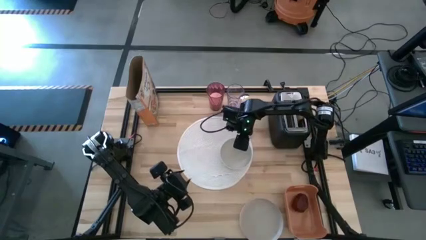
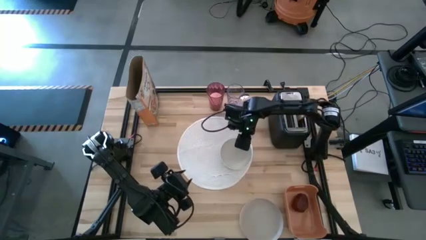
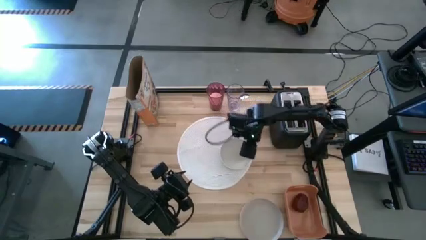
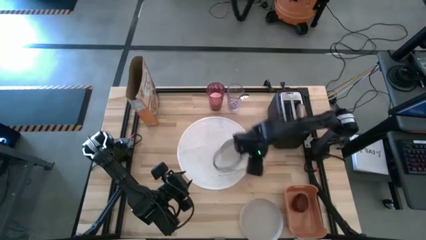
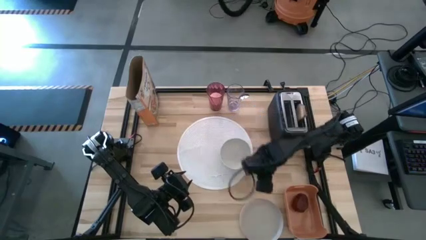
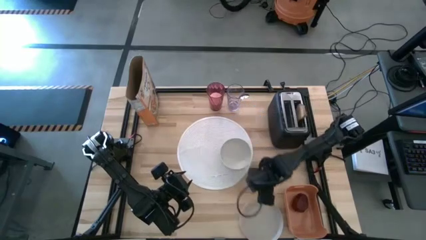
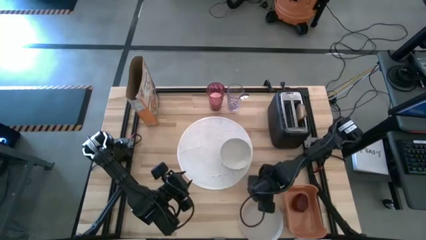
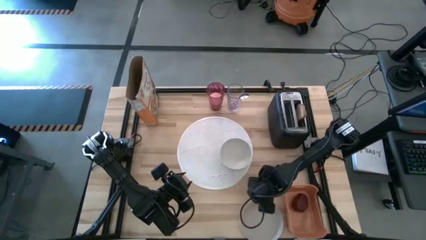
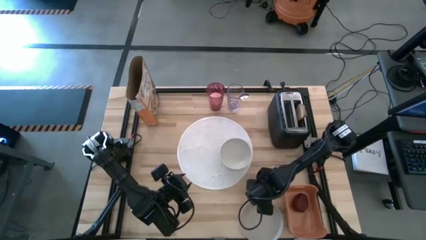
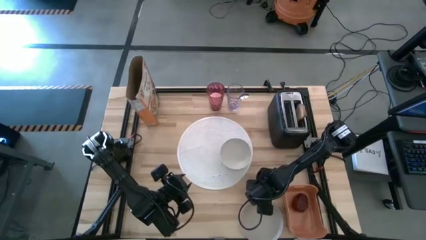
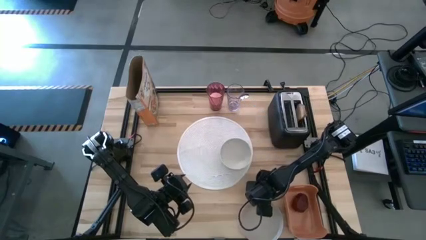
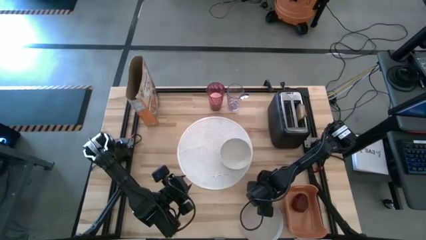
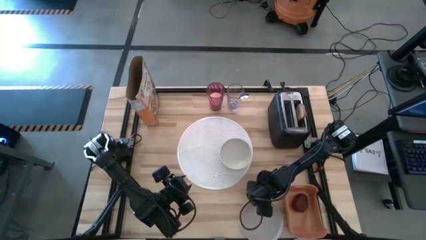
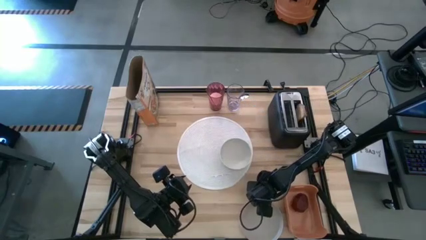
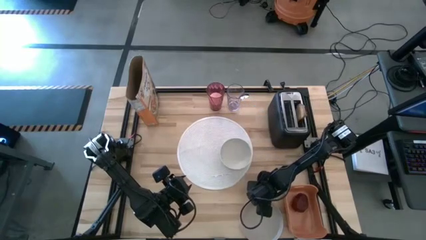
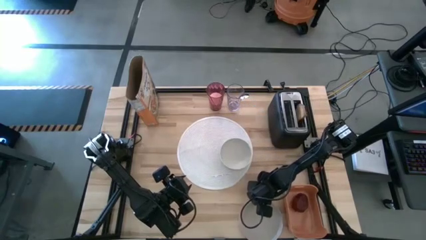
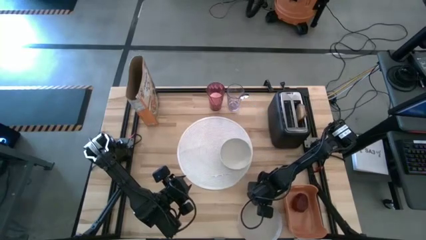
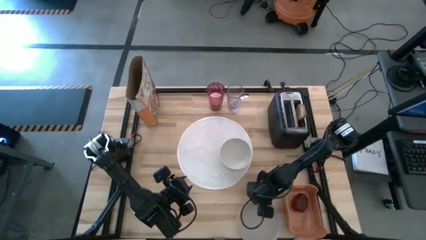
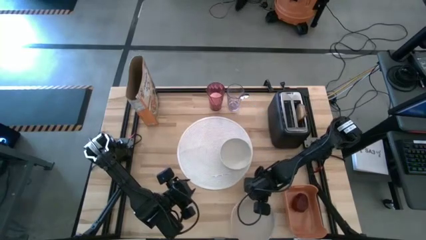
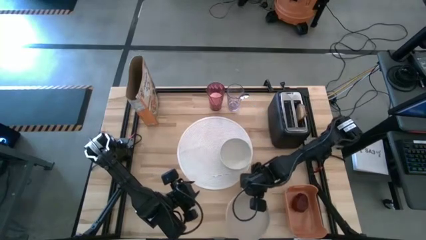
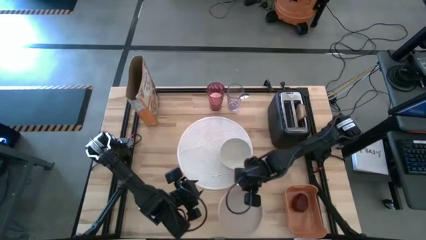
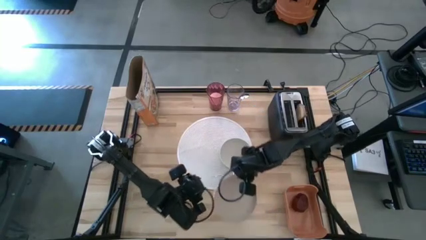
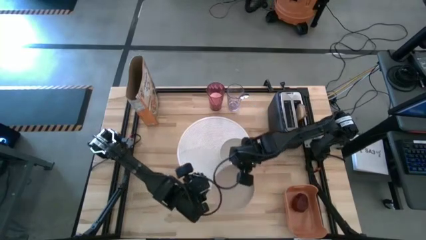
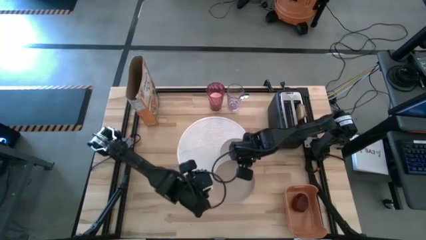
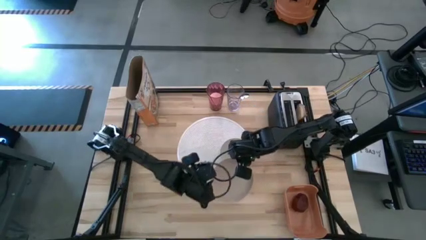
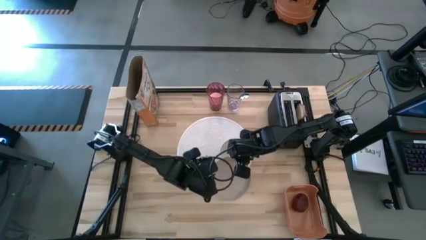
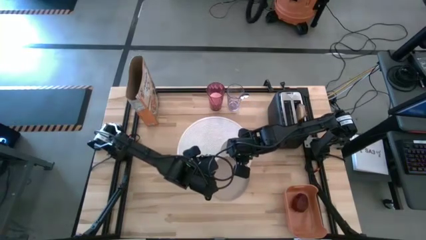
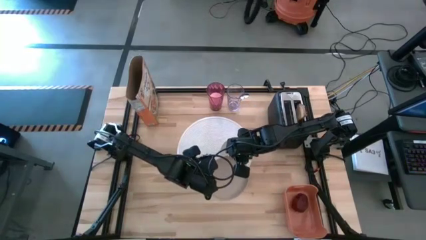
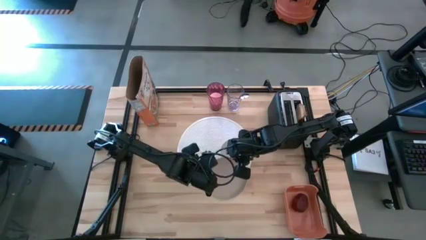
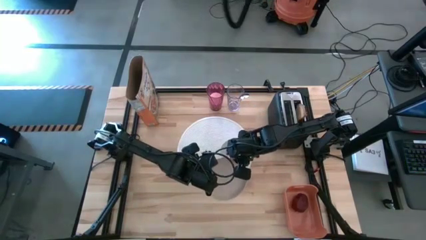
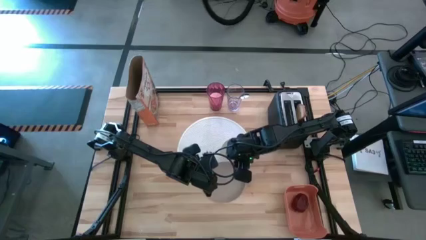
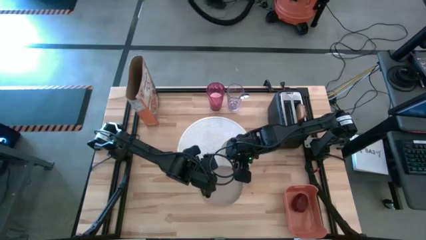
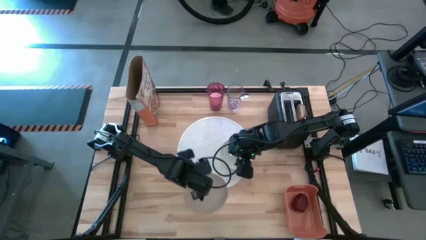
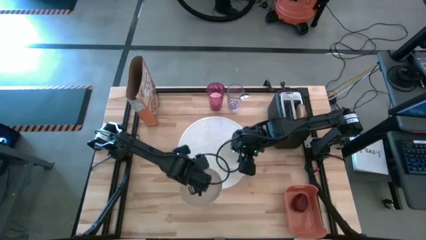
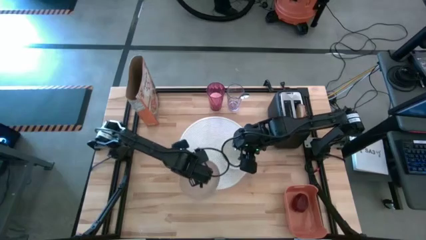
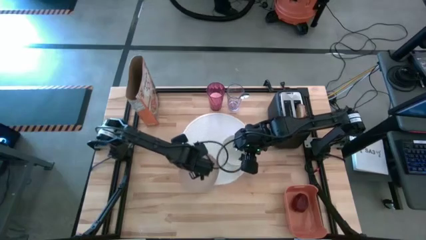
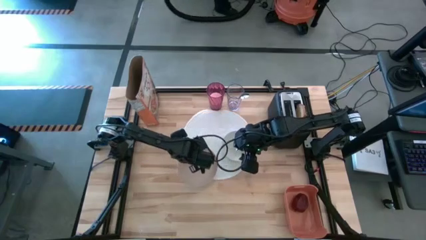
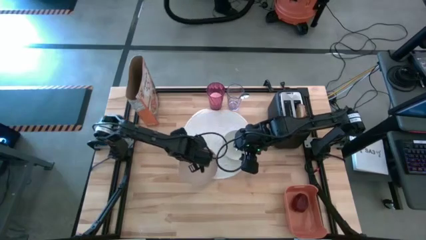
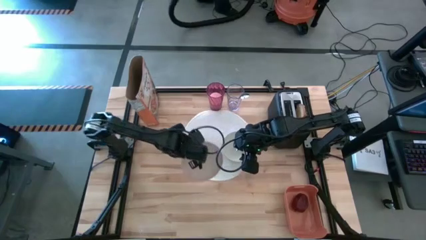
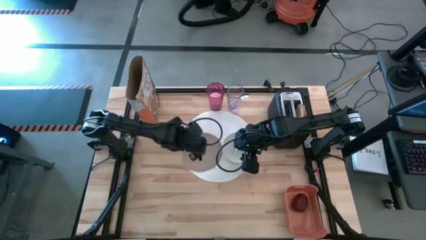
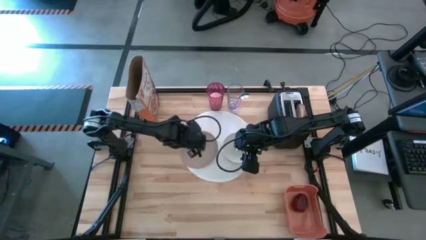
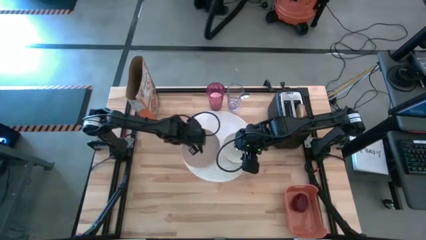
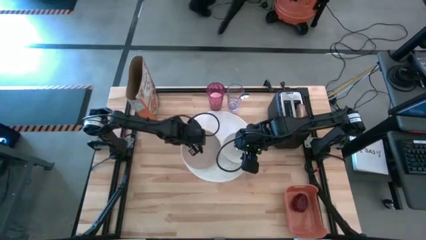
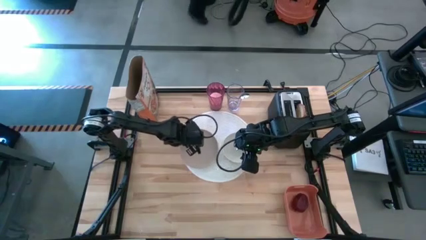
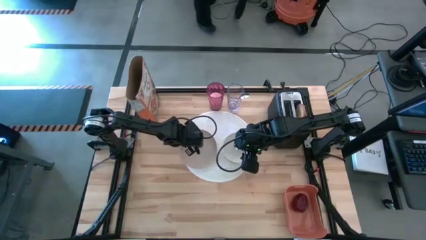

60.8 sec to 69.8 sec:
Task: Arrange a breakfast setting
Put the gray plate on the placemat

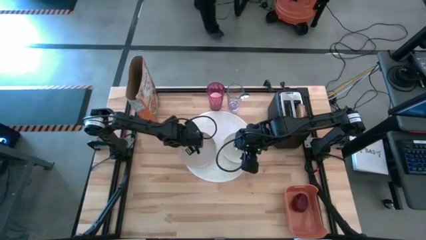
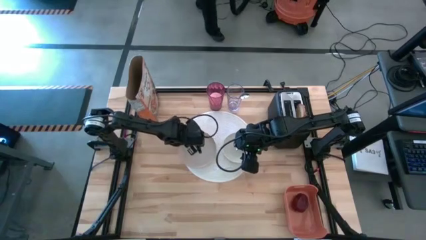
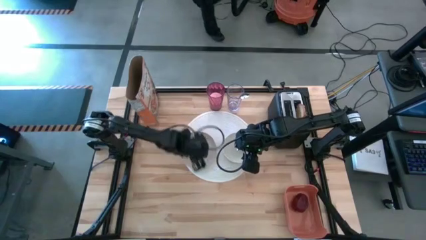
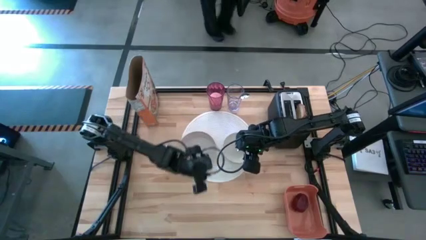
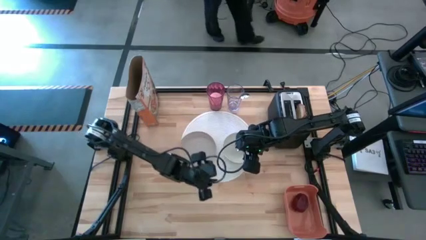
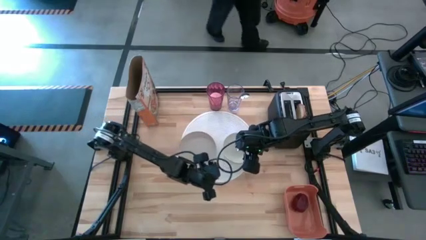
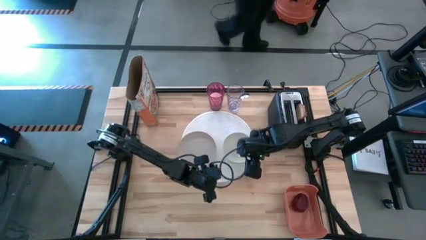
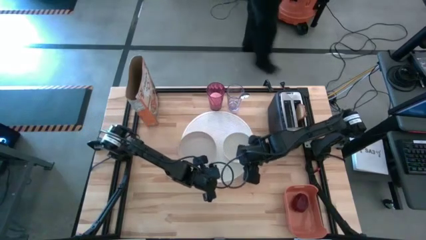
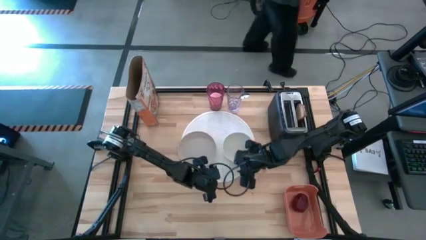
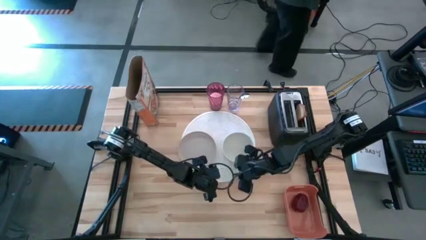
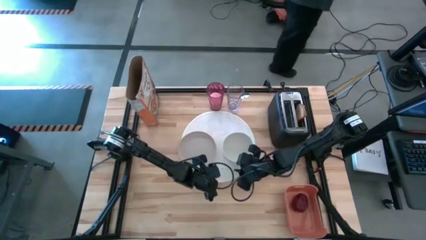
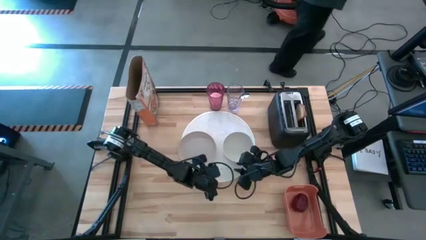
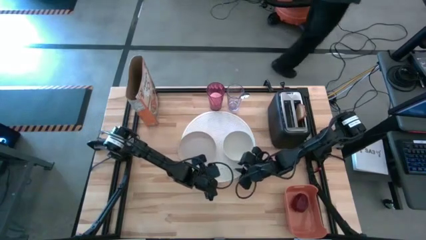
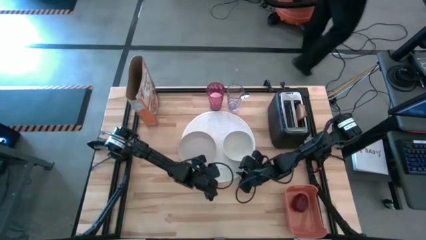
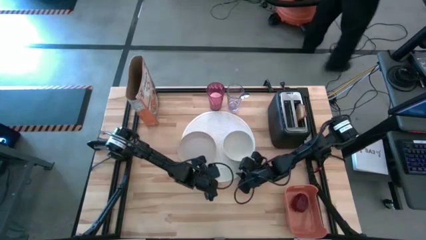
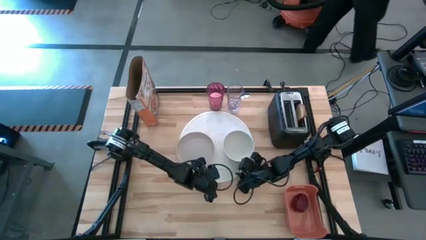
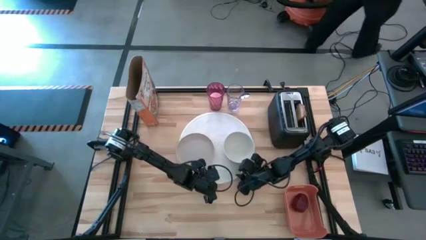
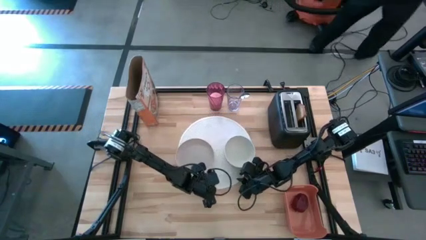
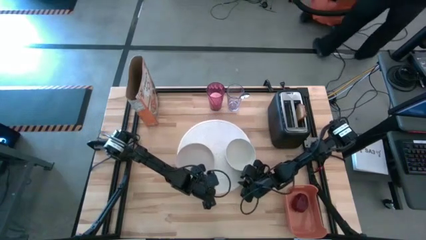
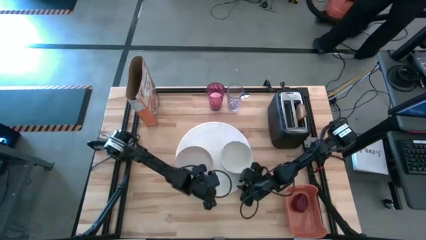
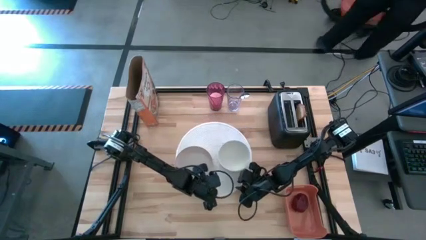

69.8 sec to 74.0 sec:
Adjust the white placemat

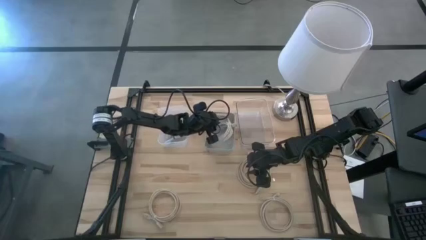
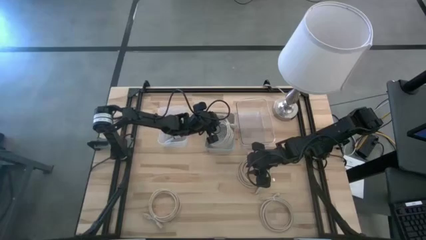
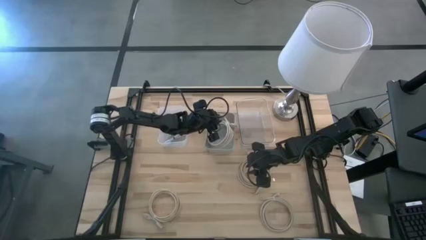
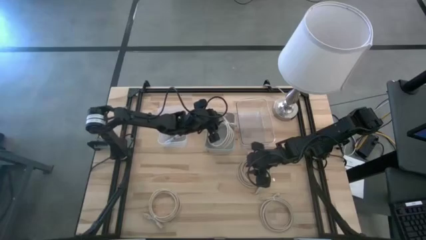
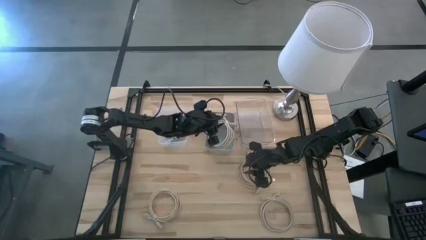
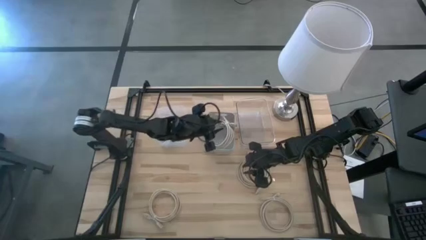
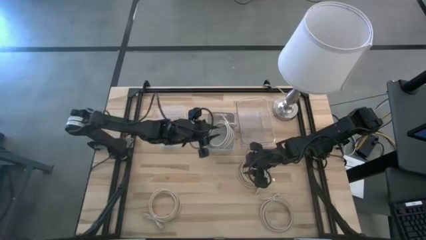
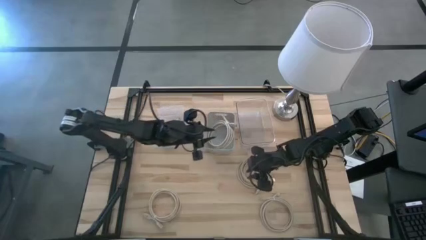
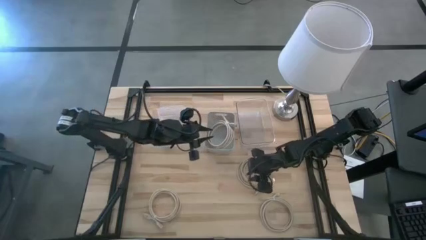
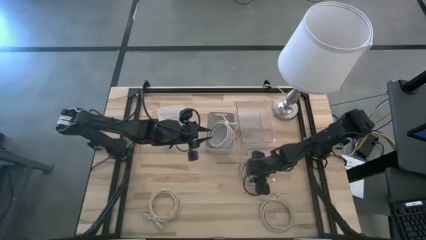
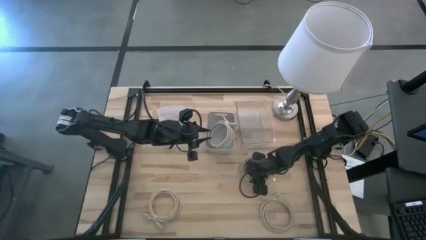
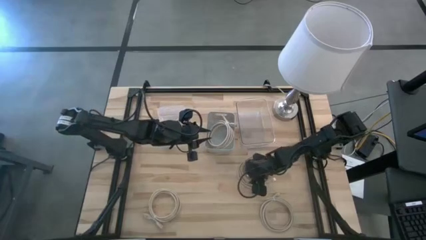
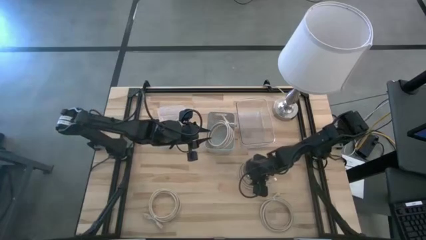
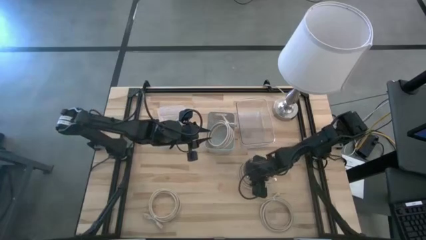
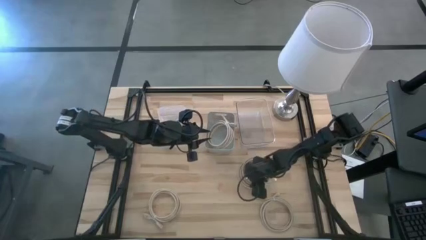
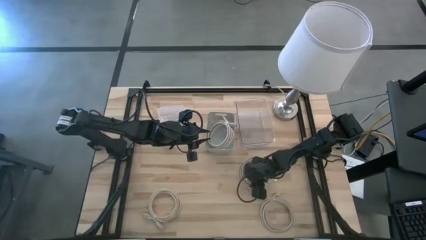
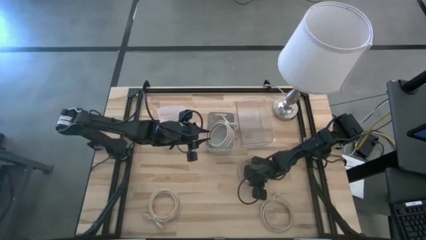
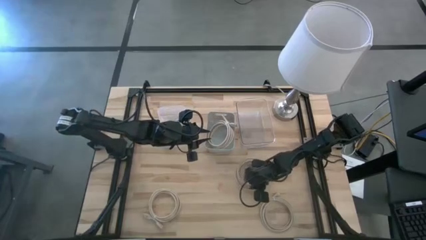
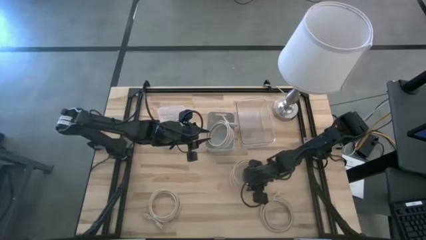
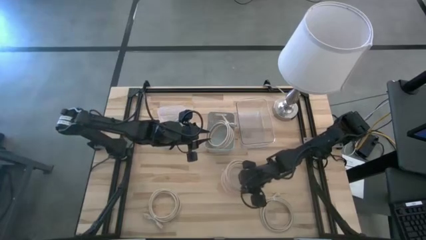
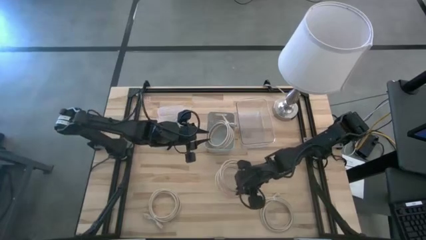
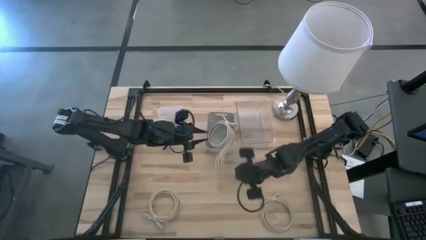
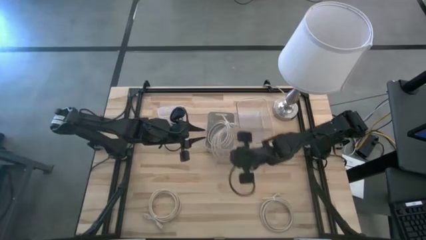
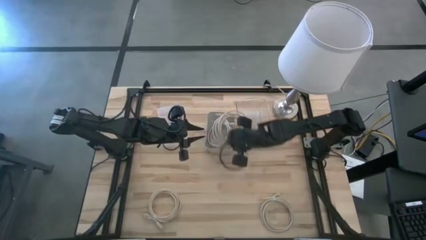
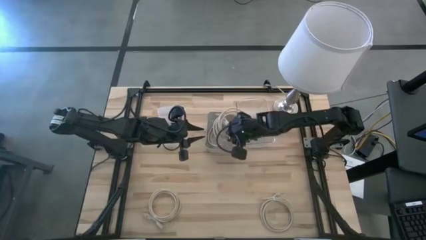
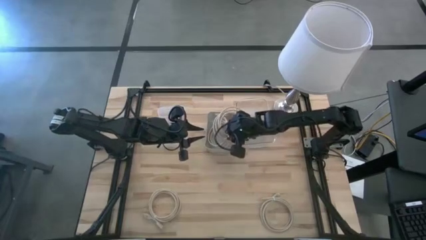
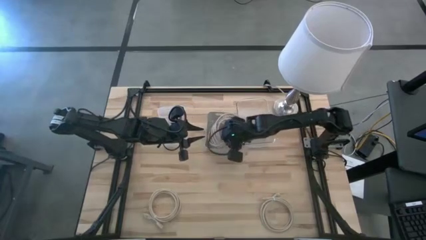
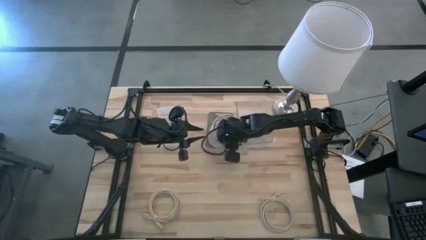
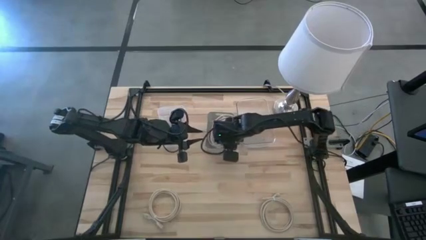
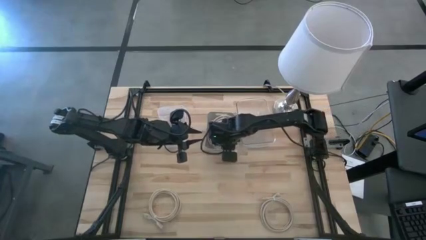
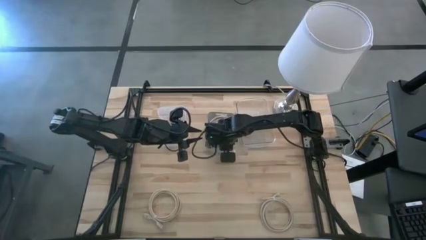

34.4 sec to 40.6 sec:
Task: Pick & Place USB Port
Put the brown hdmi cable into the white bin
